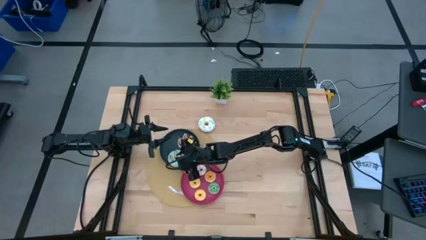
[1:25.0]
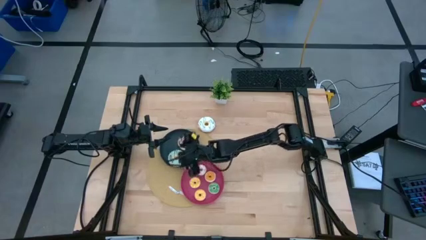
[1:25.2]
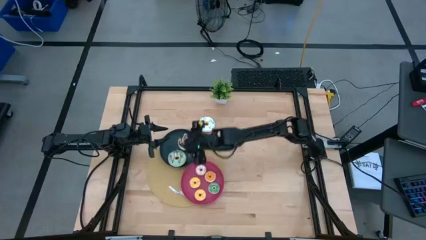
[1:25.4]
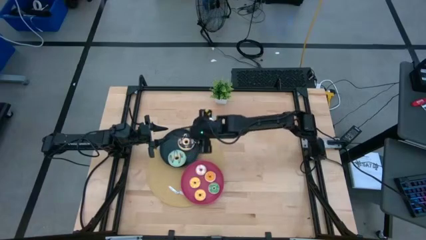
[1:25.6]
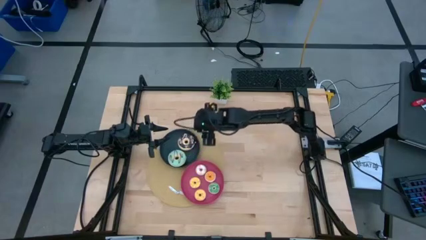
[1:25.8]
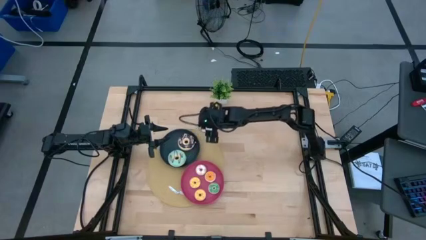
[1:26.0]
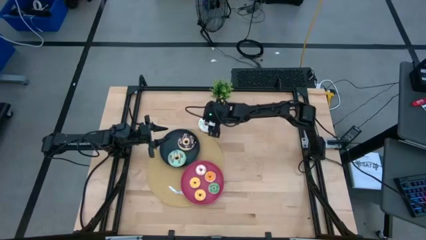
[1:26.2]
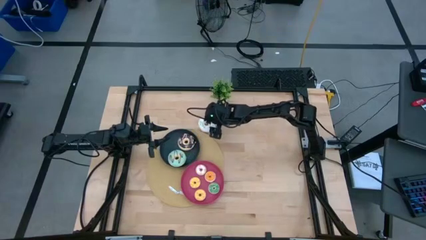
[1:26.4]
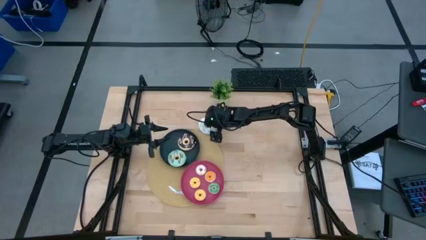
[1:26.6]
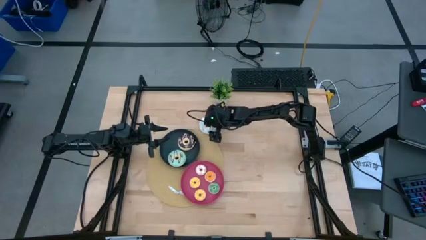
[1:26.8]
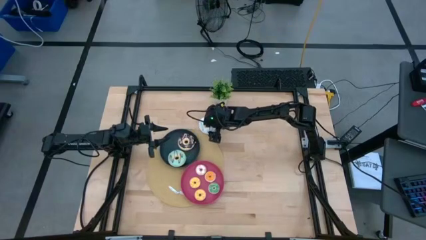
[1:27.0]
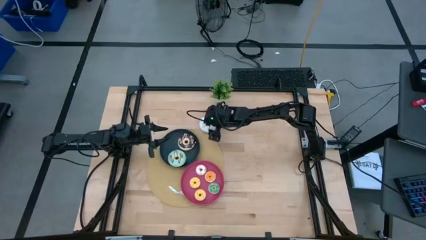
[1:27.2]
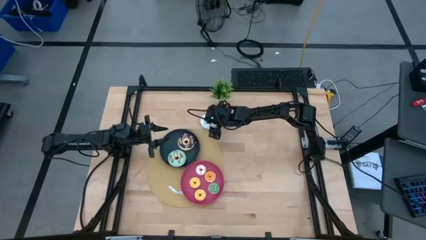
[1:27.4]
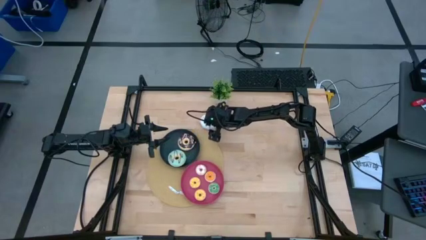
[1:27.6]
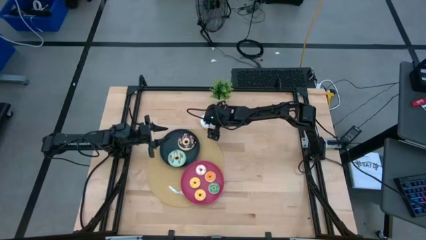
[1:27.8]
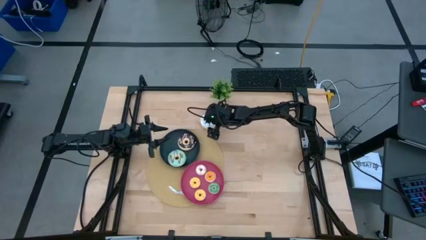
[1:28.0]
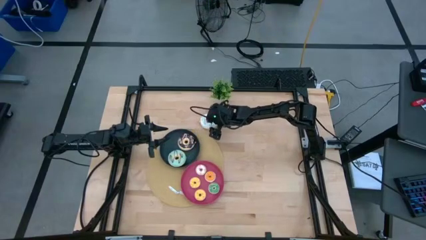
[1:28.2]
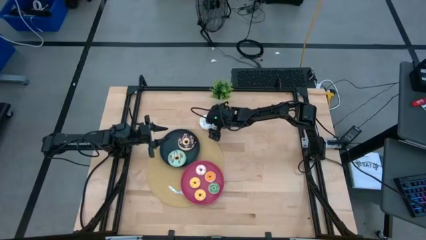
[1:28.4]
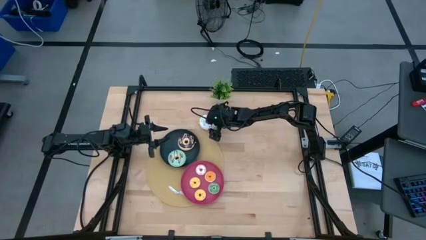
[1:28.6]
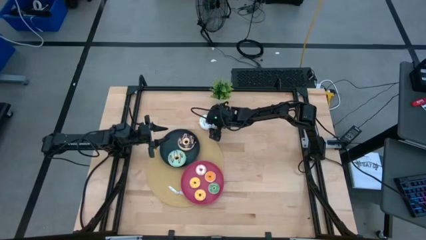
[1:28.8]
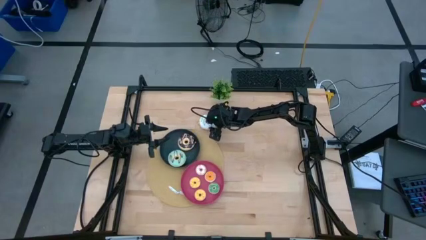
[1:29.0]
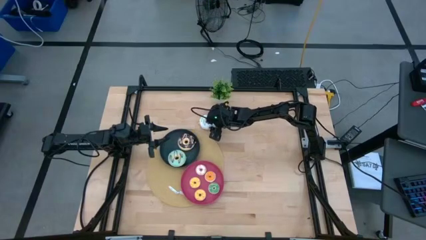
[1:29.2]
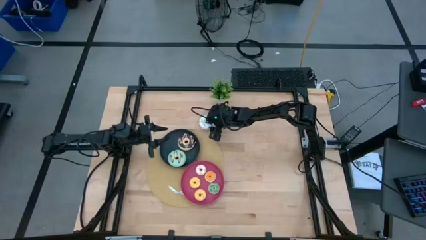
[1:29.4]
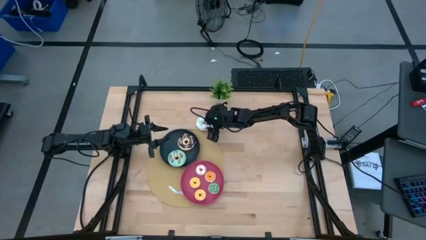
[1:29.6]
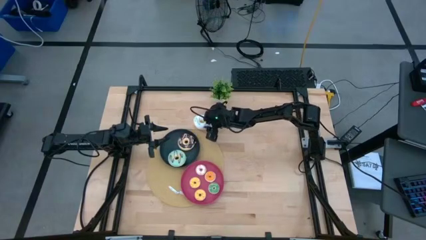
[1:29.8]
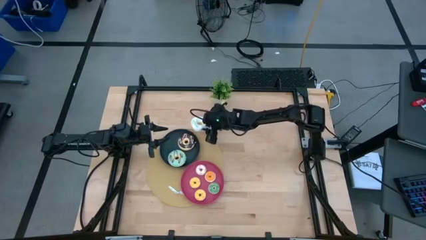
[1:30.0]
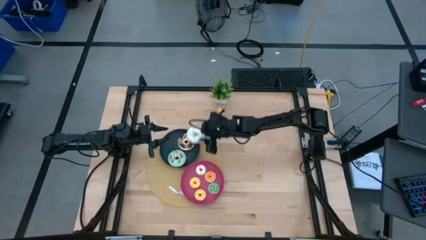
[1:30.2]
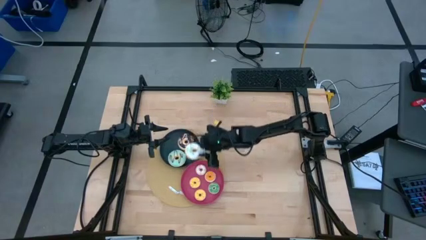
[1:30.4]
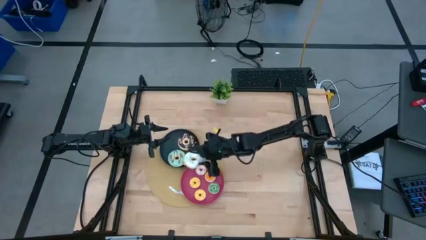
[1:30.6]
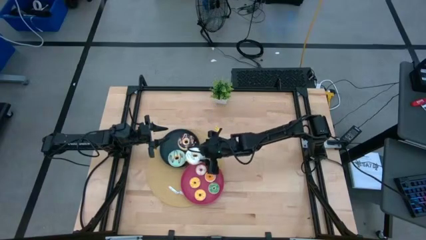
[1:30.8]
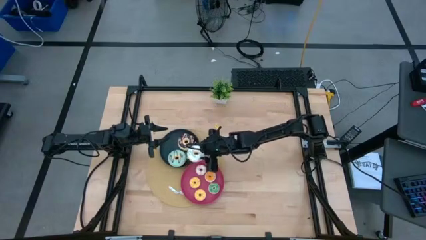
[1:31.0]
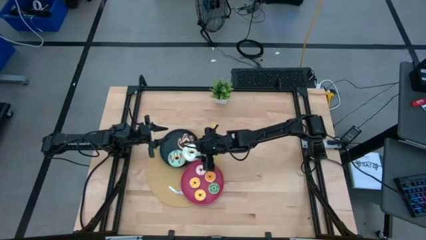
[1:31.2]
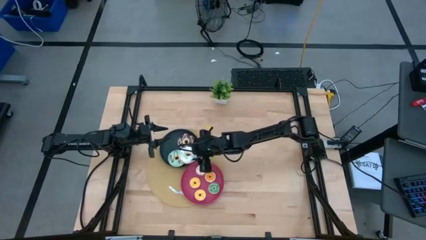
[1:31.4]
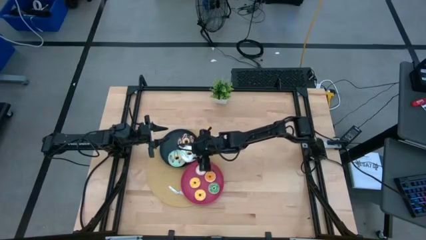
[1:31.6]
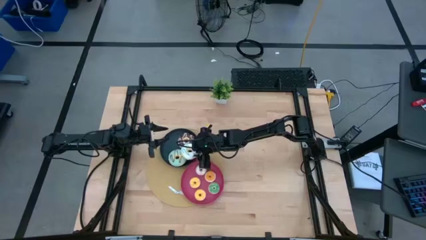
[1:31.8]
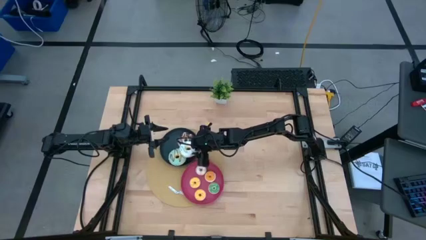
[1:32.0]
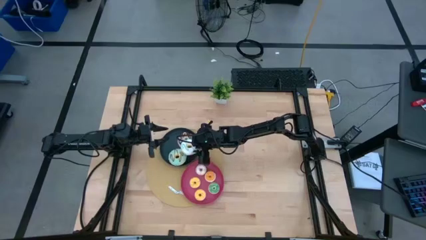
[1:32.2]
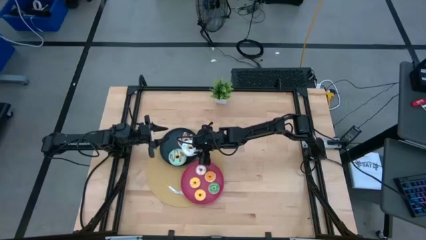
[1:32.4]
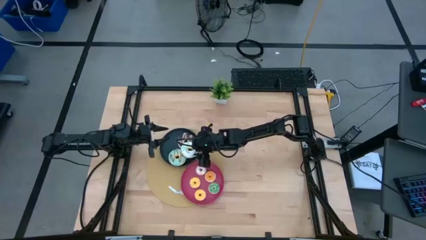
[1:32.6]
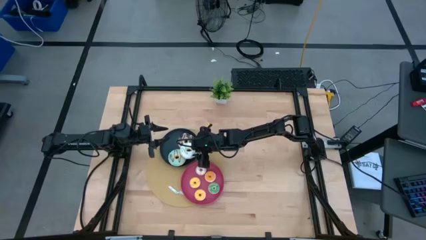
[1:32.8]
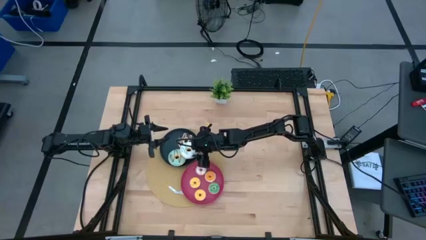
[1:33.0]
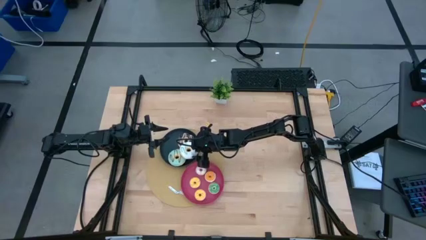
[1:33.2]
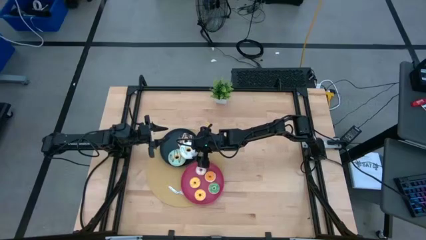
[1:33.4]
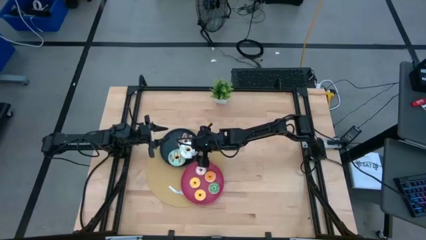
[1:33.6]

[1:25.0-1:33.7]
Task: Pick & Place donuts
Put the large white donut into the black plate
